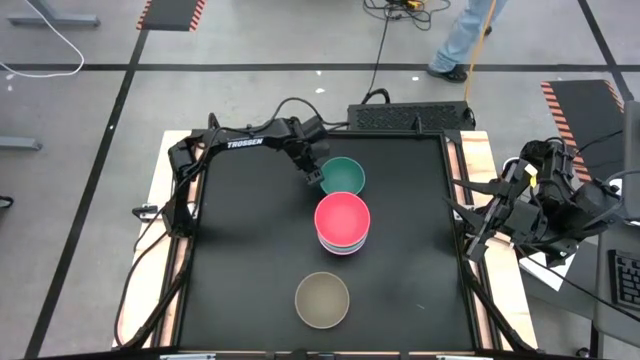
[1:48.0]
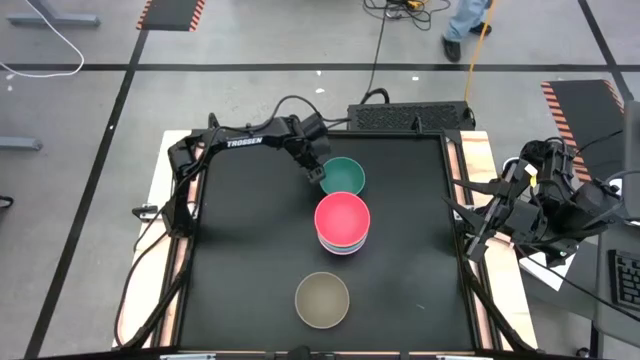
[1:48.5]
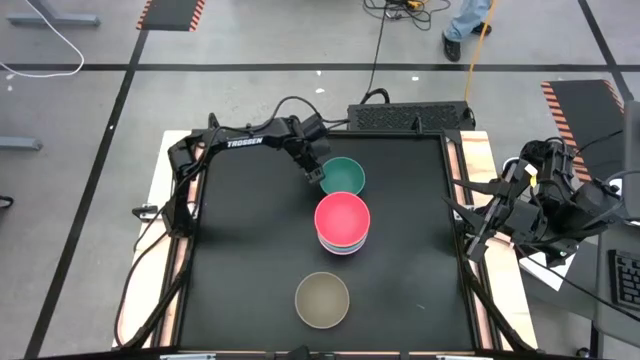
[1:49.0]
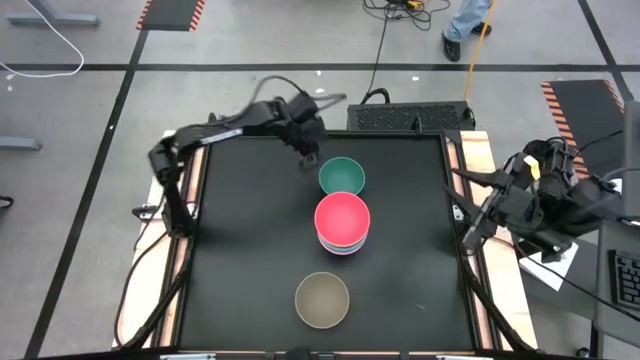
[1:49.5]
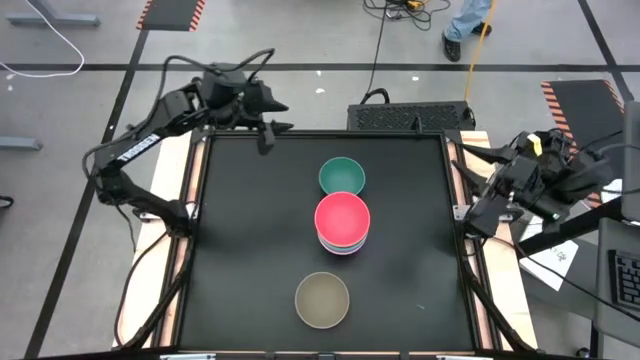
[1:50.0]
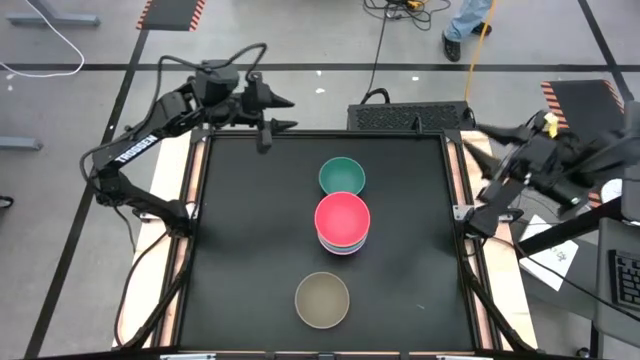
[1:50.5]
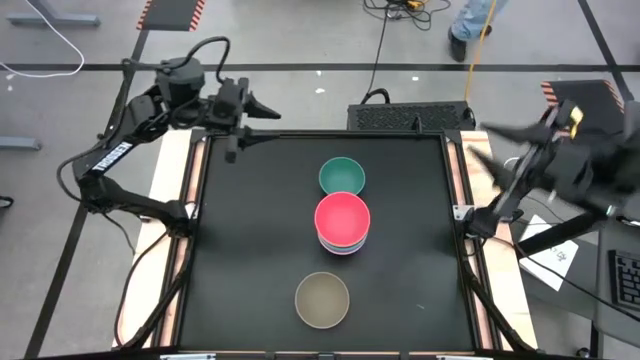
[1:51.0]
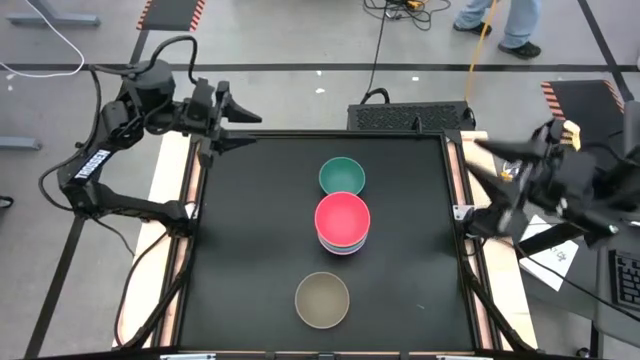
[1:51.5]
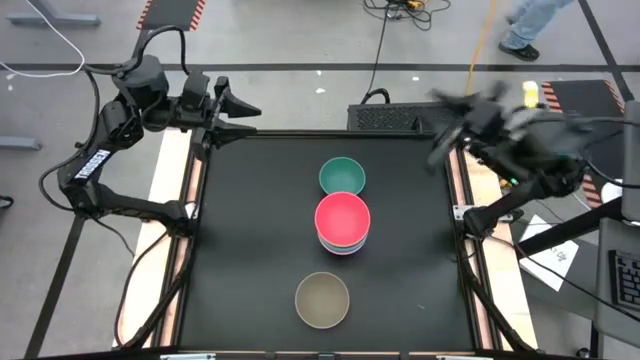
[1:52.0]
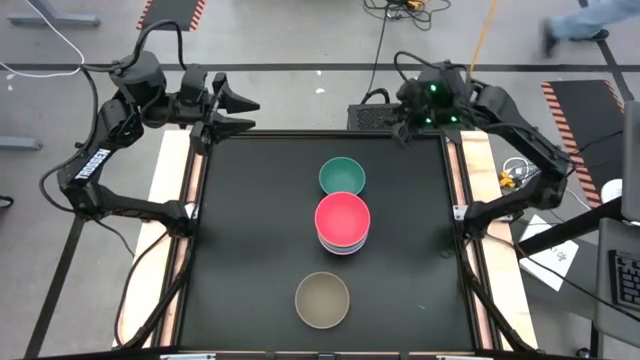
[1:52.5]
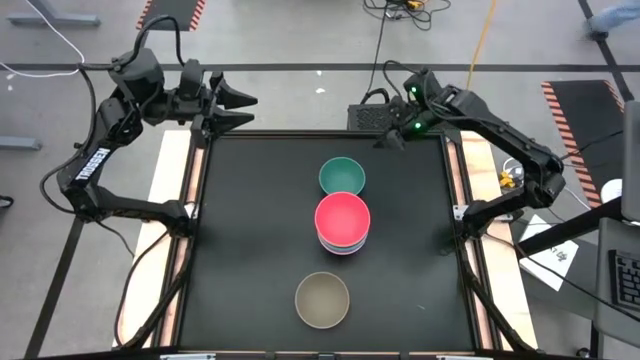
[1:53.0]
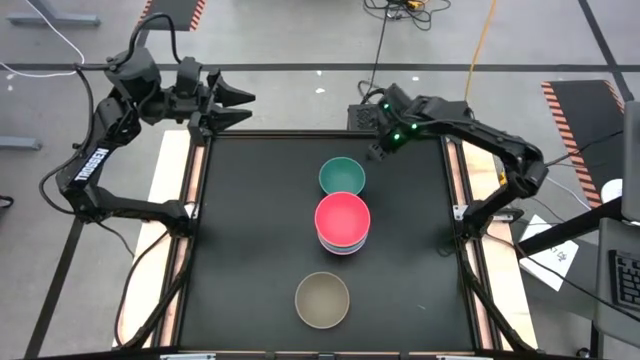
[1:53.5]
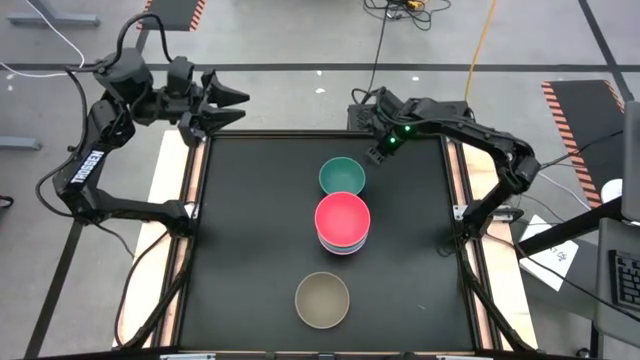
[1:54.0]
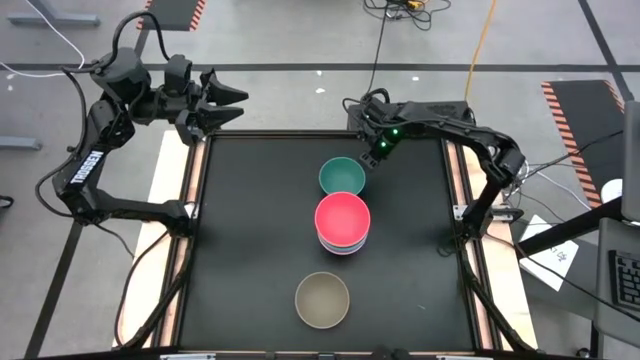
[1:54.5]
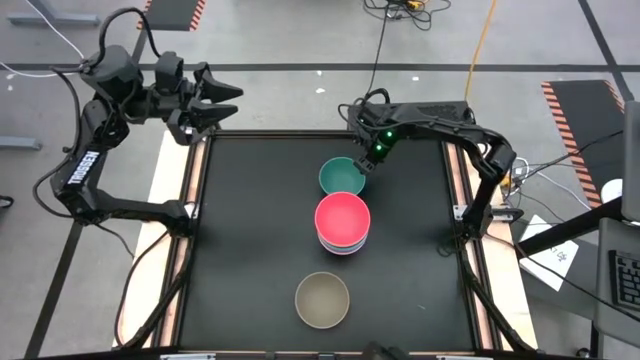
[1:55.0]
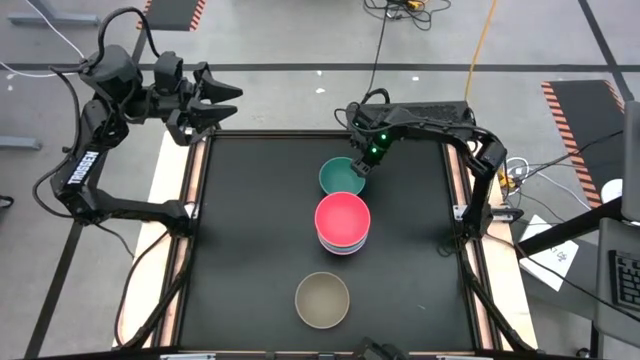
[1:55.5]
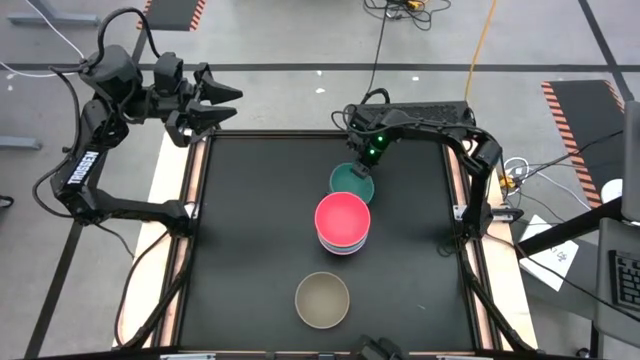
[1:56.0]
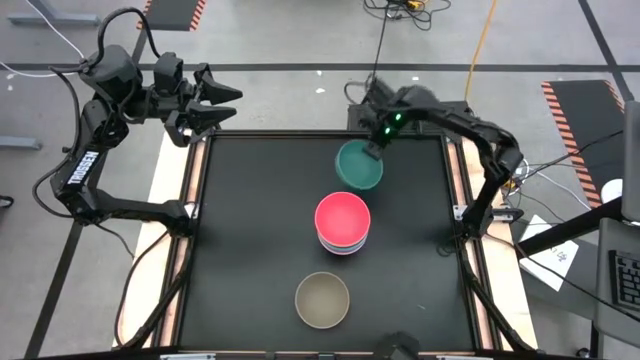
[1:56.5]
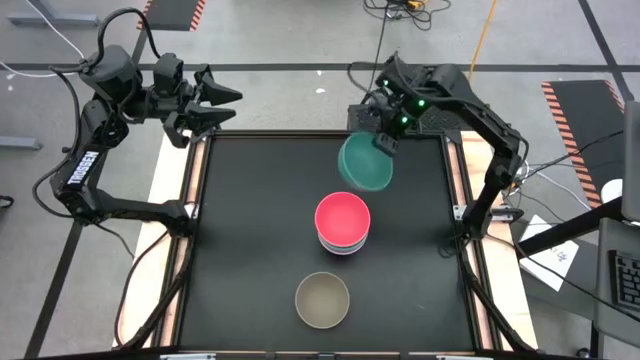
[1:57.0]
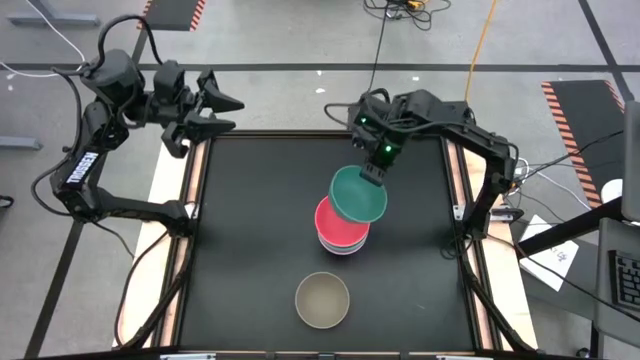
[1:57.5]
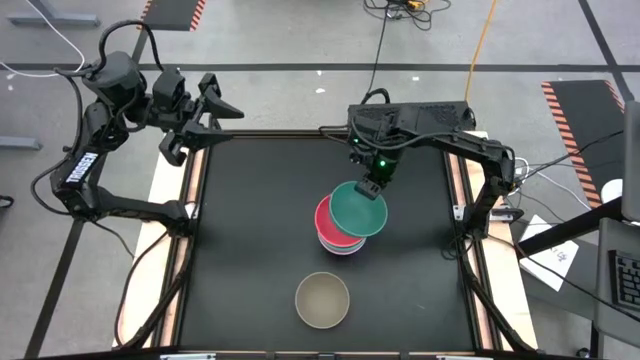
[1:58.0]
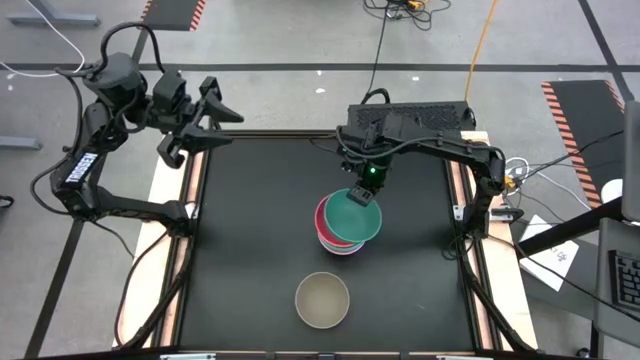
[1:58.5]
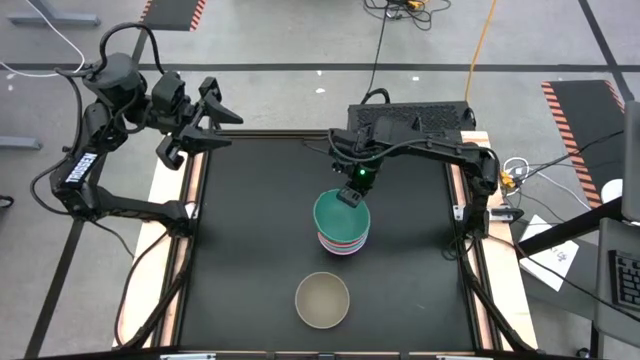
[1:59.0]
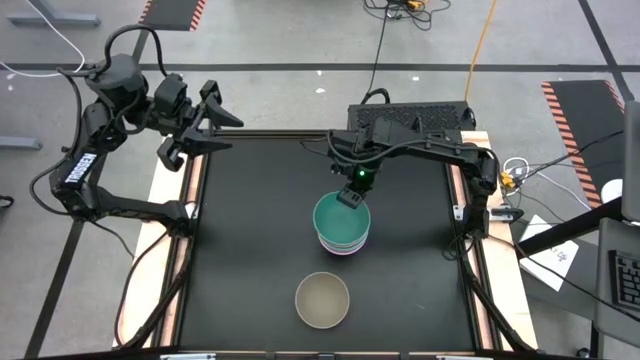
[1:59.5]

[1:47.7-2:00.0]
Task: Nest bowls inside each other
Stack the dark green bowl on top of the light pink bowl

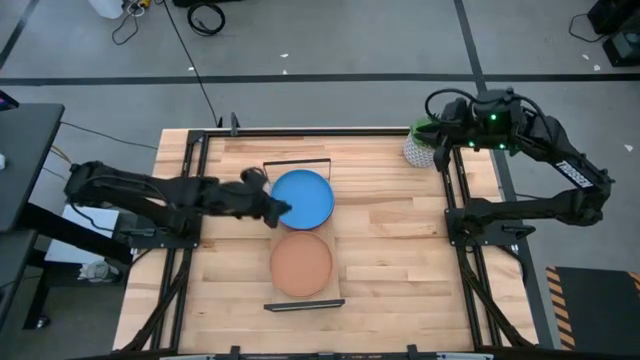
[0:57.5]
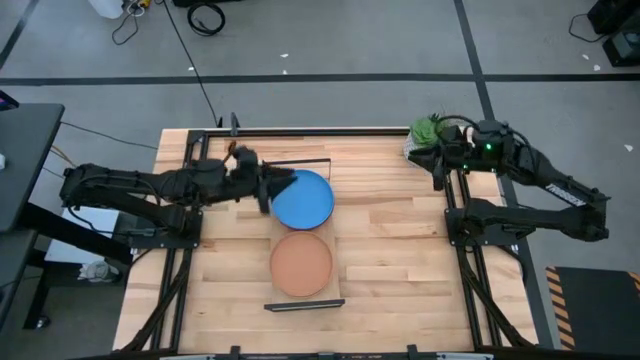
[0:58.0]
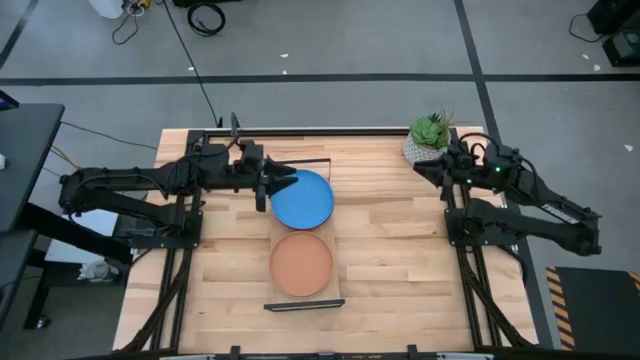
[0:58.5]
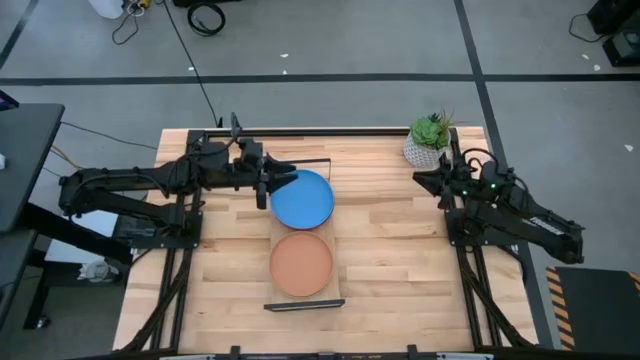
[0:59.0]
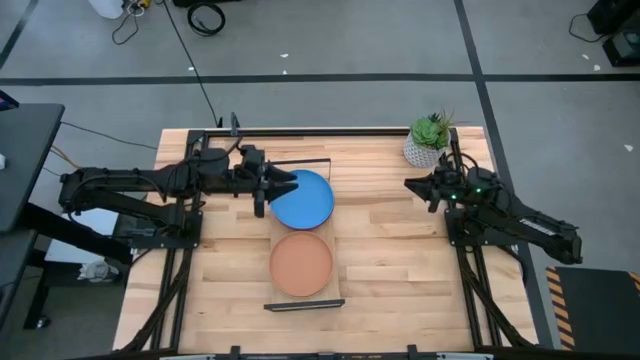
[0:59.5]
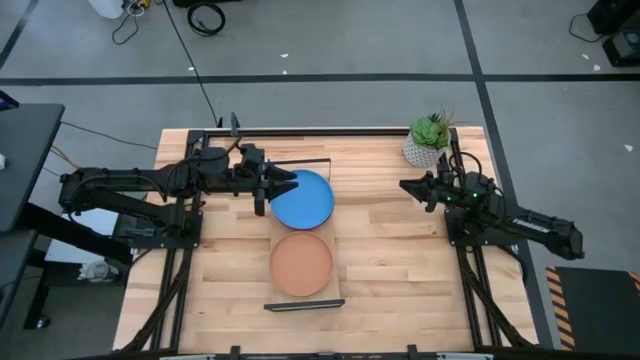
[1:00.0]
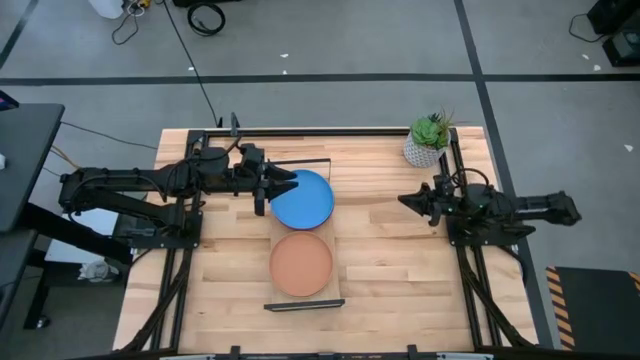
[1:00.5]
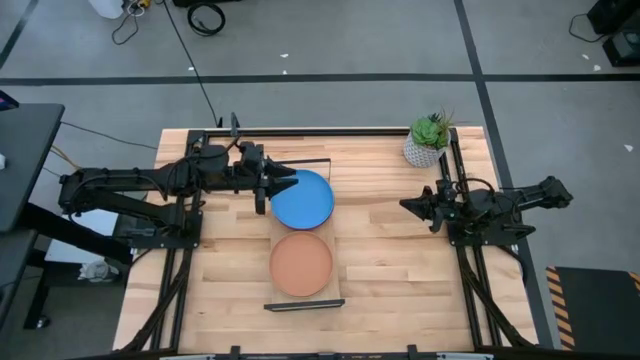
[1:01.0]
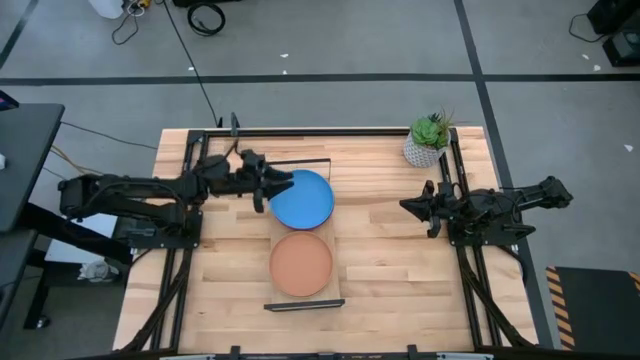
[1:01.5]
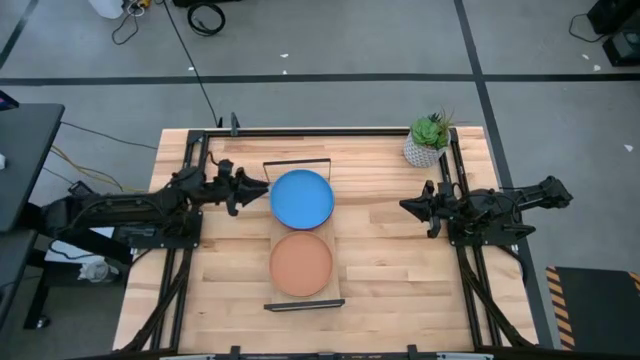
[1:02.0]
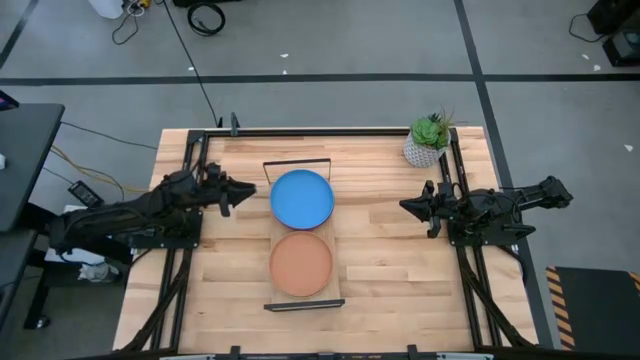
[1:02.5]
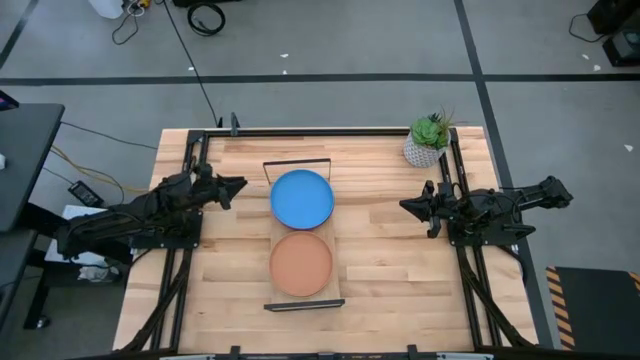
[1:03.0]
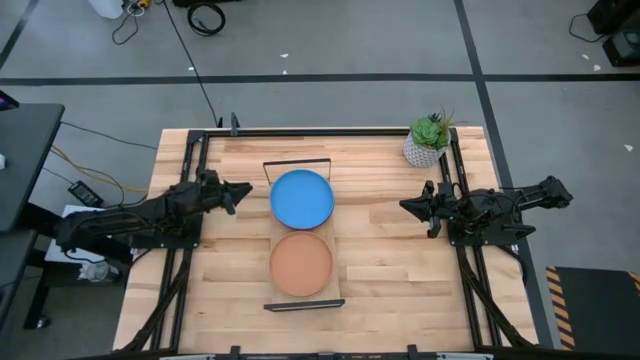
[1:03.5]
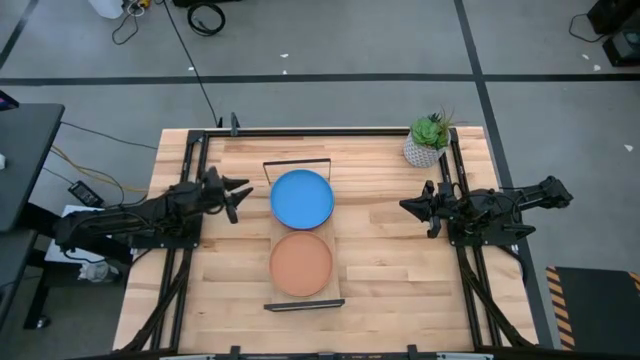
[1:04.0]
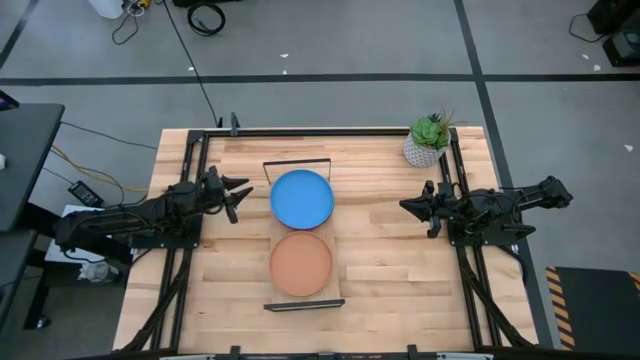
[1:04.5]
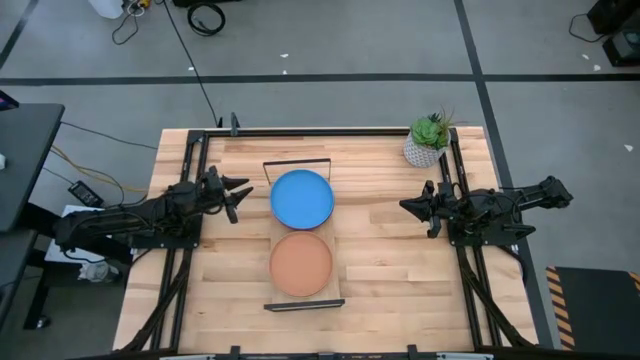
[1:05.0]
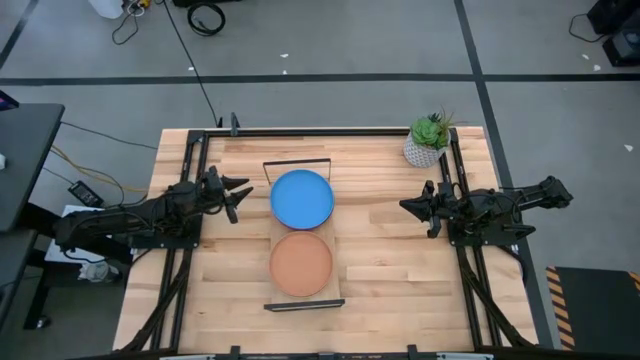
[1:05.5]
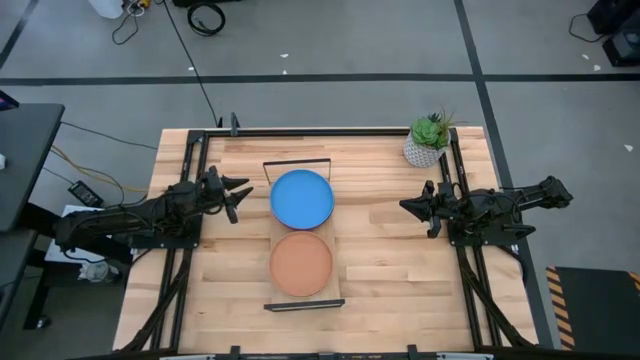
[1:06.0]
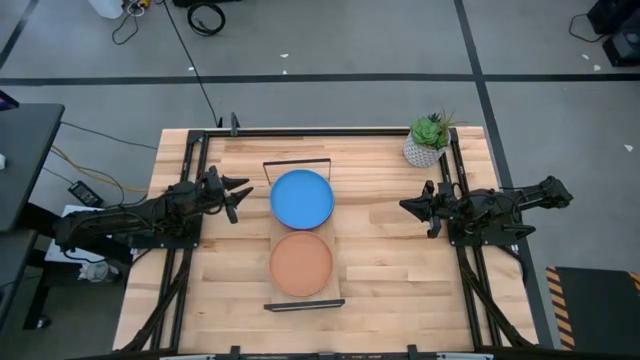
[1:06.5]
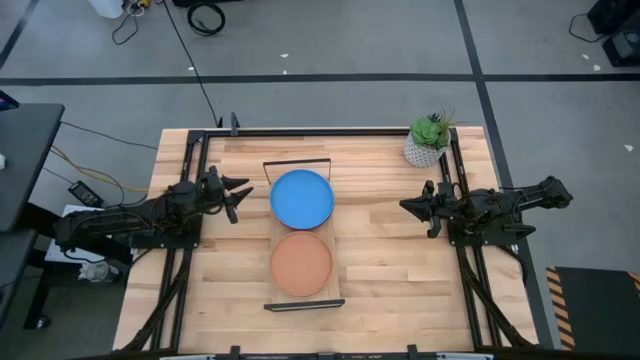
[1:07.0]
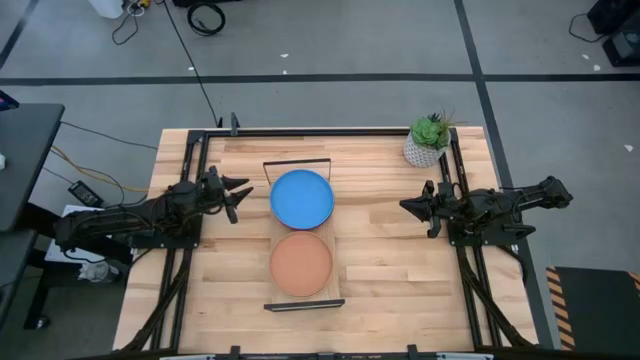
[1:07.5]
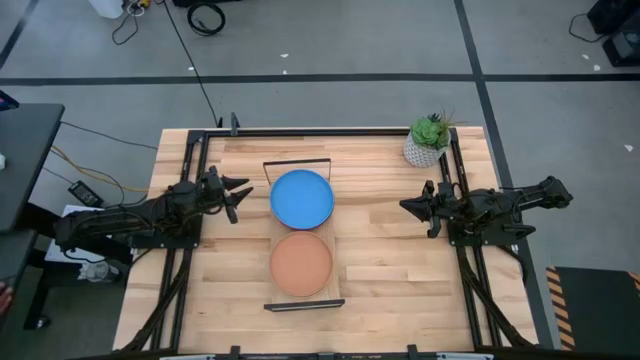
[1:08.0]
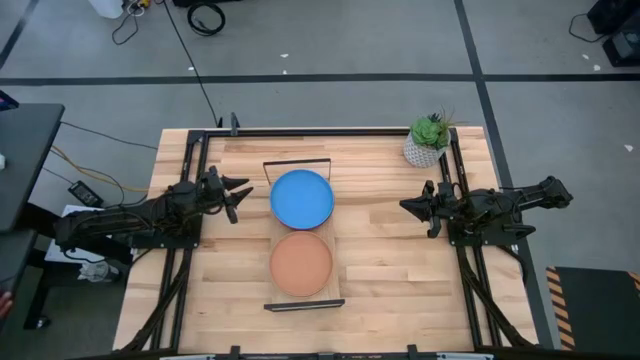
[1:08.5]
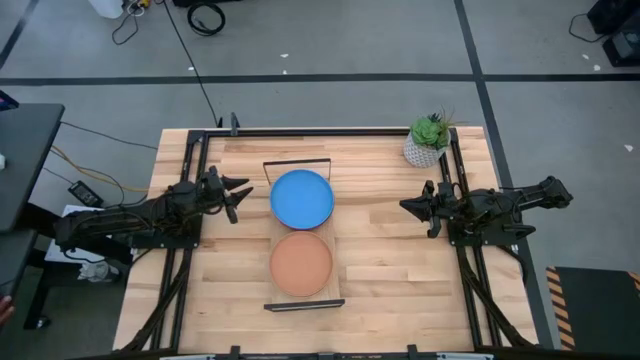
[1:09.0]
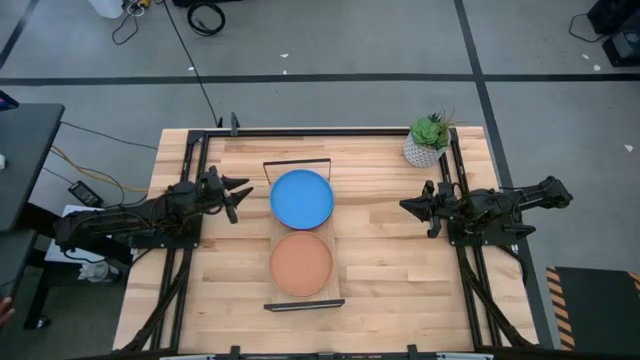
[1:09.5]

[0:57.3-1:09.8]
Task: Place and stack plates onto a shelf
Return to Home Position
